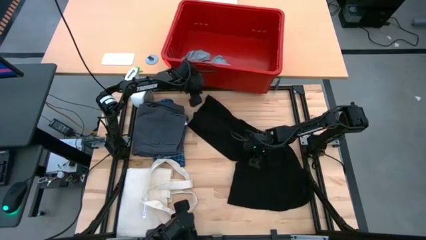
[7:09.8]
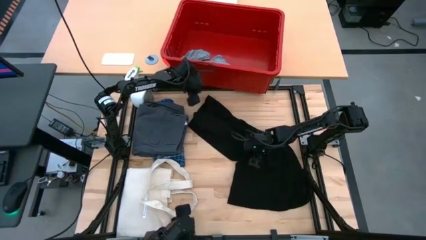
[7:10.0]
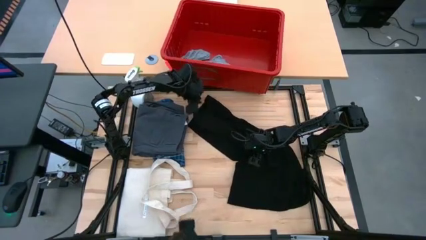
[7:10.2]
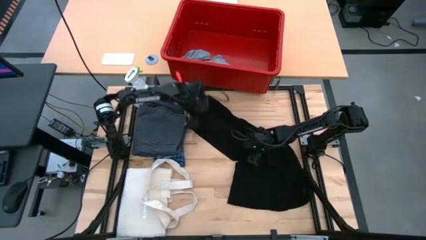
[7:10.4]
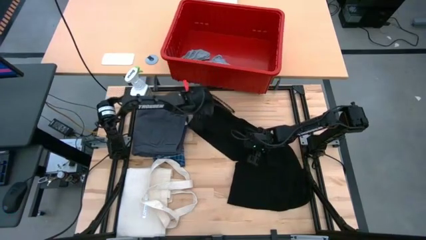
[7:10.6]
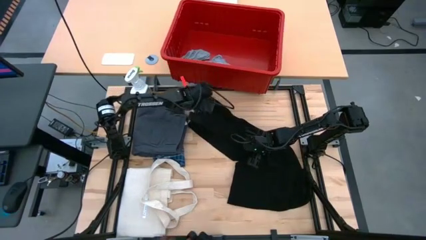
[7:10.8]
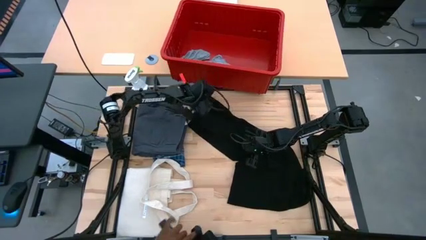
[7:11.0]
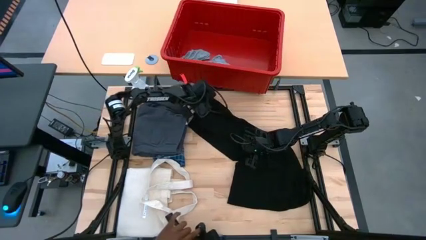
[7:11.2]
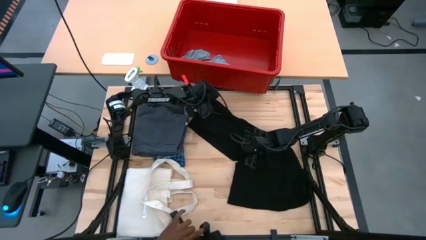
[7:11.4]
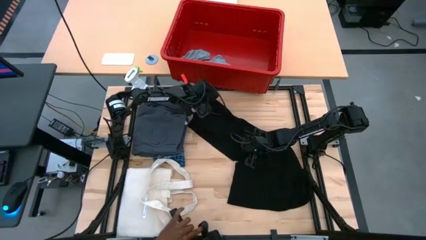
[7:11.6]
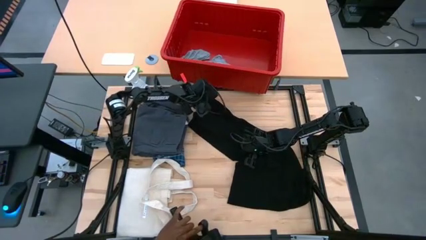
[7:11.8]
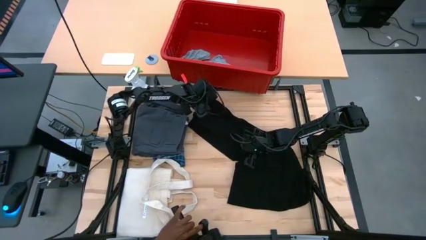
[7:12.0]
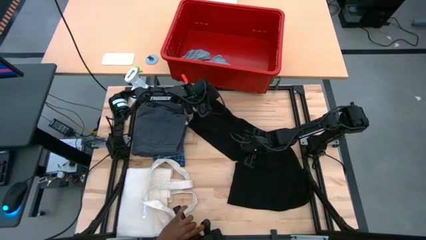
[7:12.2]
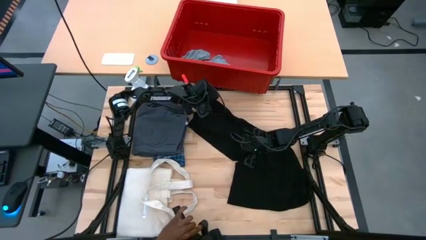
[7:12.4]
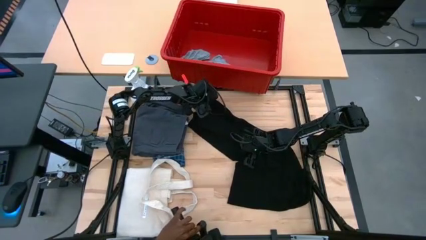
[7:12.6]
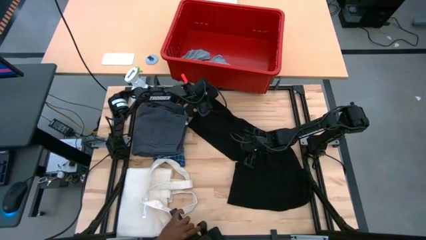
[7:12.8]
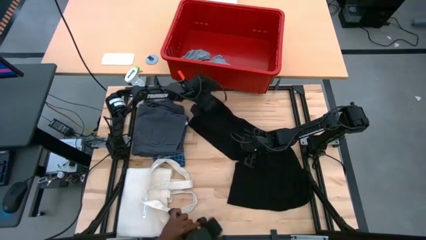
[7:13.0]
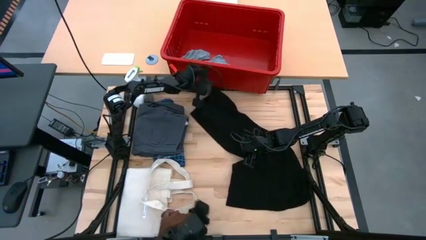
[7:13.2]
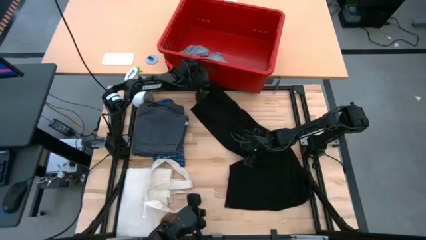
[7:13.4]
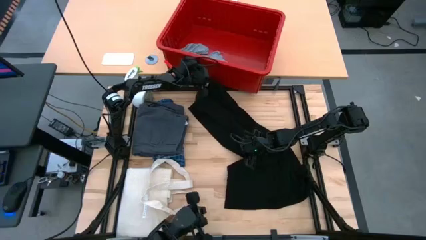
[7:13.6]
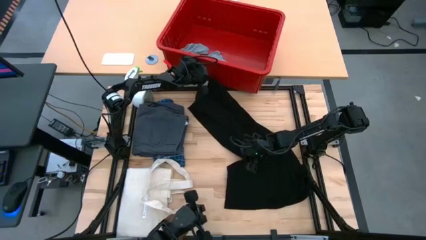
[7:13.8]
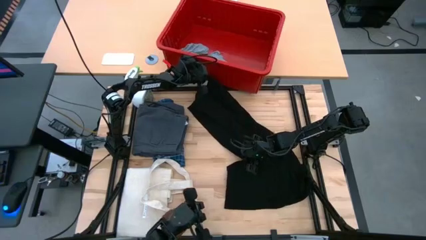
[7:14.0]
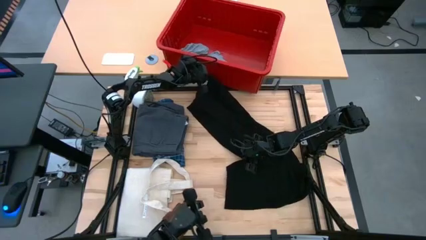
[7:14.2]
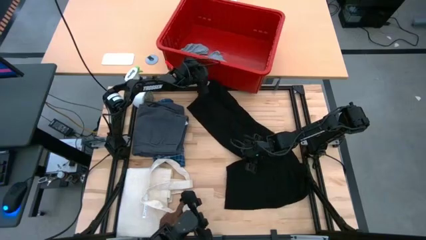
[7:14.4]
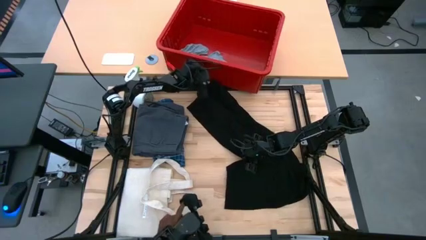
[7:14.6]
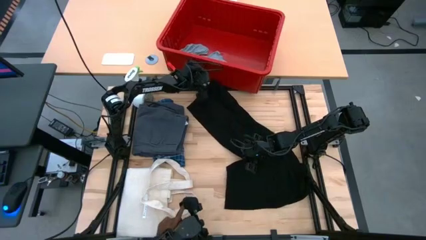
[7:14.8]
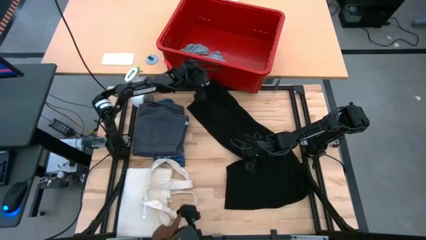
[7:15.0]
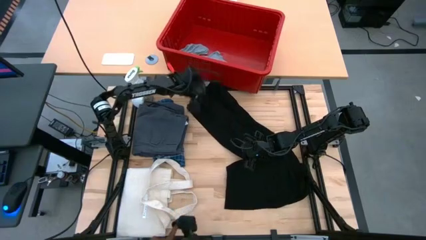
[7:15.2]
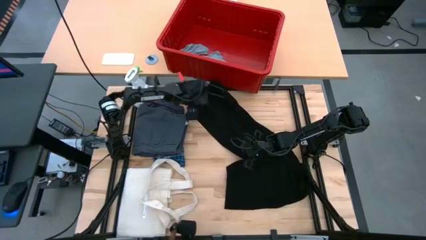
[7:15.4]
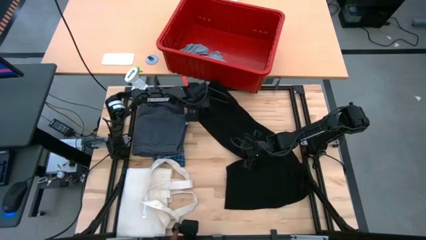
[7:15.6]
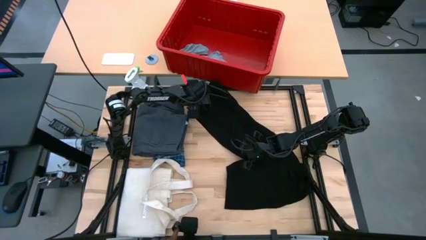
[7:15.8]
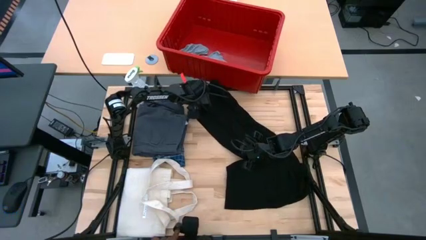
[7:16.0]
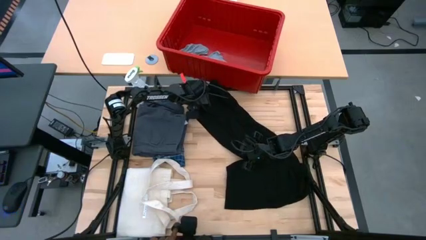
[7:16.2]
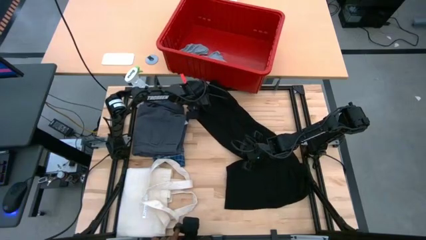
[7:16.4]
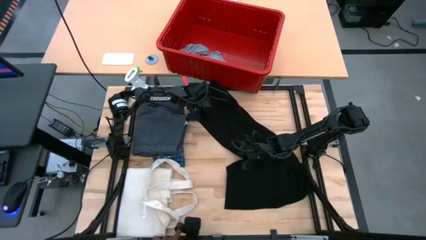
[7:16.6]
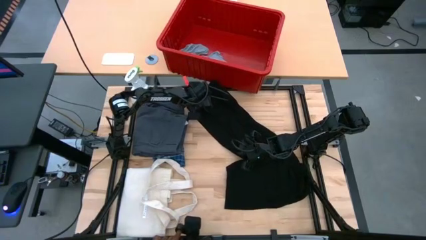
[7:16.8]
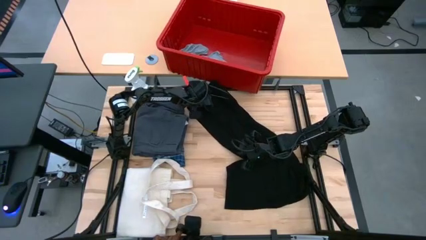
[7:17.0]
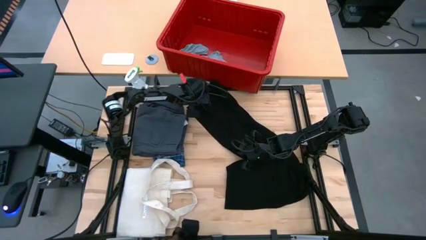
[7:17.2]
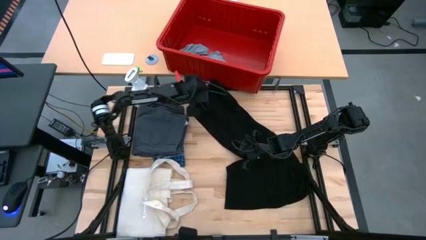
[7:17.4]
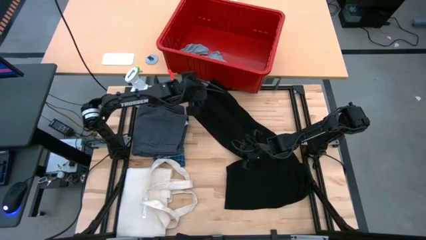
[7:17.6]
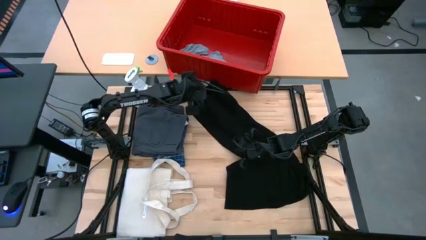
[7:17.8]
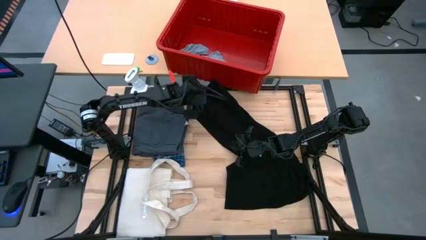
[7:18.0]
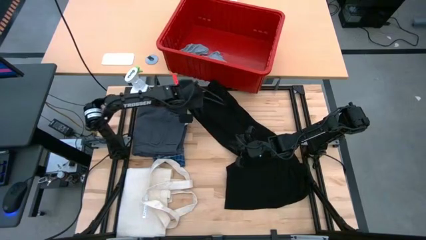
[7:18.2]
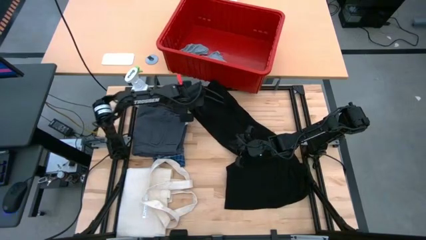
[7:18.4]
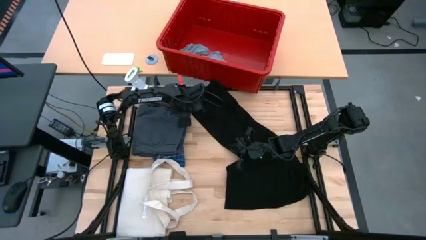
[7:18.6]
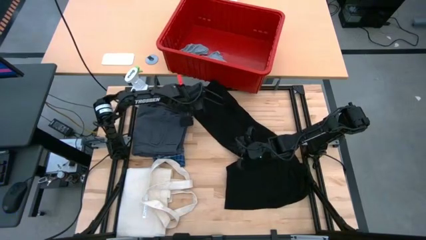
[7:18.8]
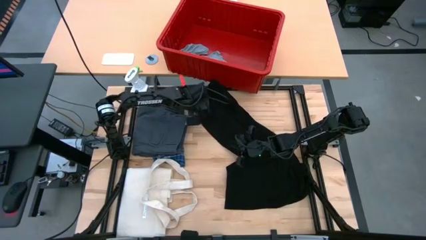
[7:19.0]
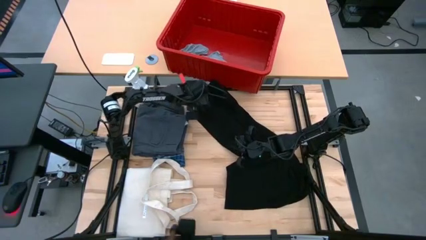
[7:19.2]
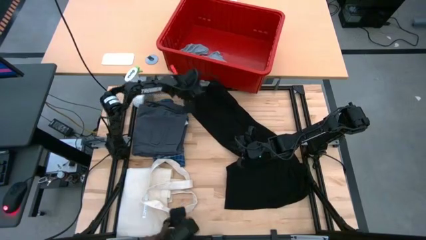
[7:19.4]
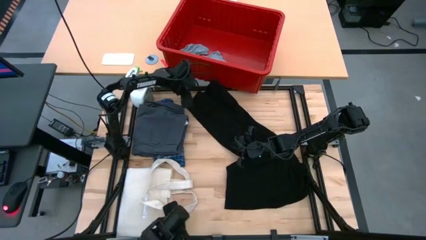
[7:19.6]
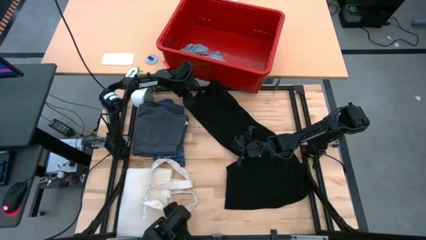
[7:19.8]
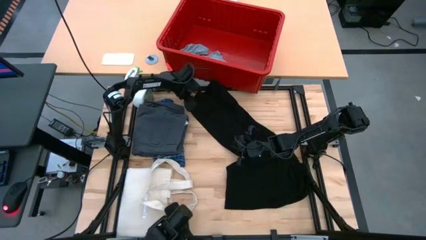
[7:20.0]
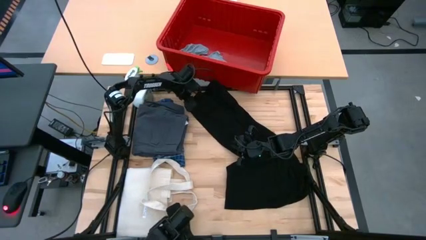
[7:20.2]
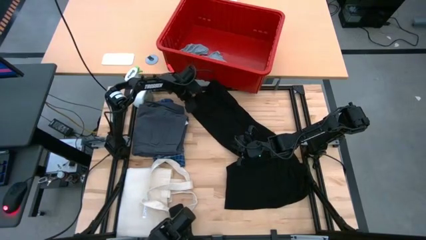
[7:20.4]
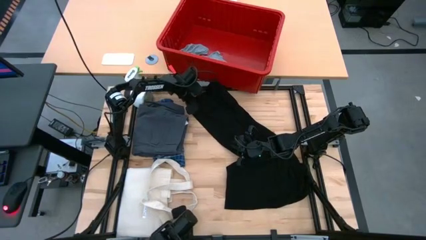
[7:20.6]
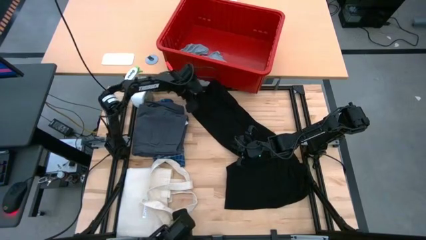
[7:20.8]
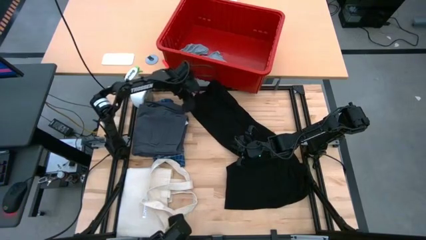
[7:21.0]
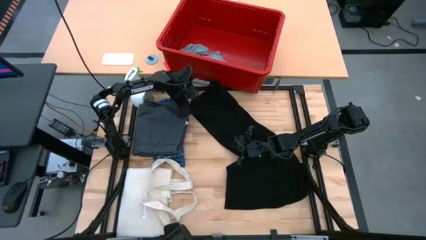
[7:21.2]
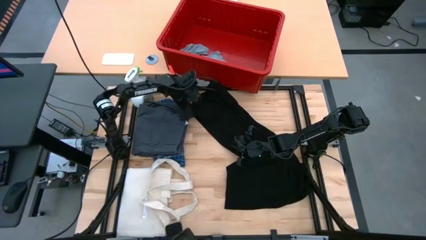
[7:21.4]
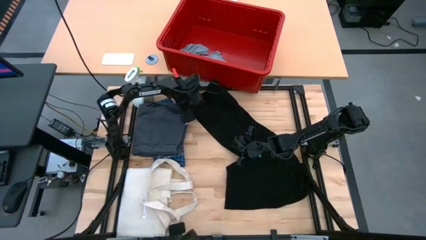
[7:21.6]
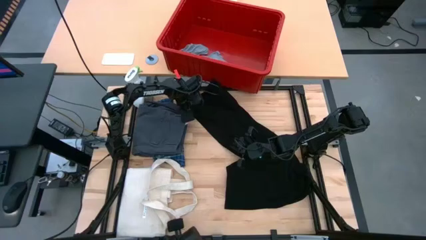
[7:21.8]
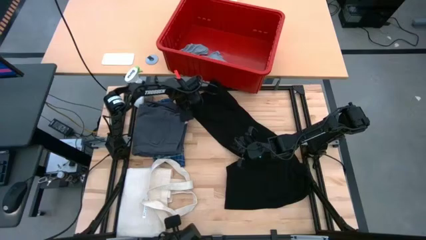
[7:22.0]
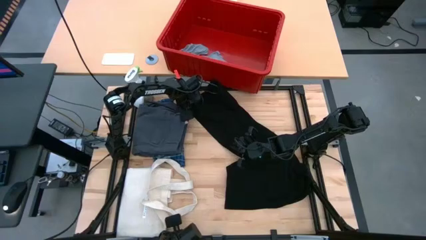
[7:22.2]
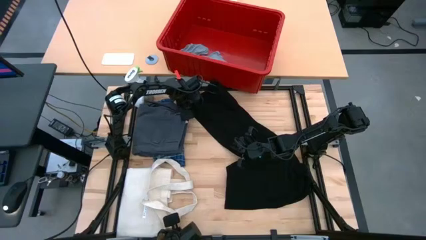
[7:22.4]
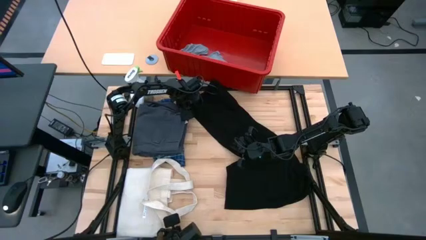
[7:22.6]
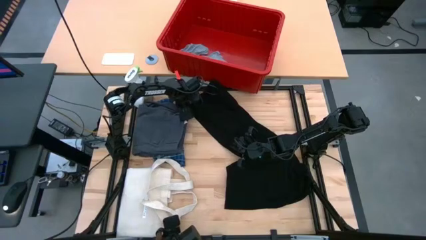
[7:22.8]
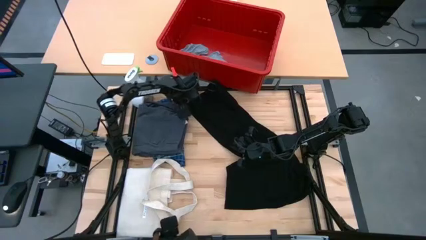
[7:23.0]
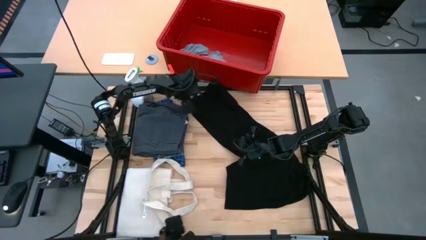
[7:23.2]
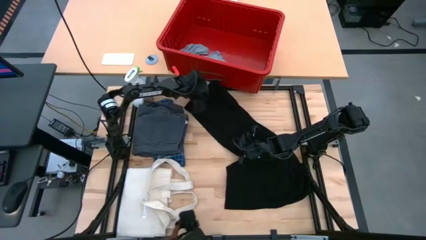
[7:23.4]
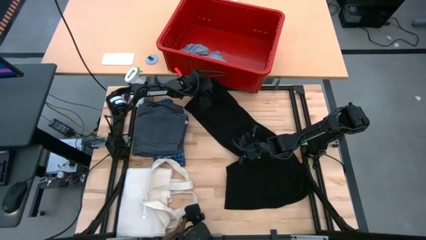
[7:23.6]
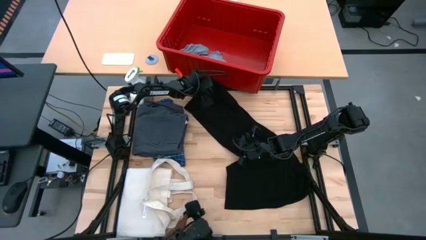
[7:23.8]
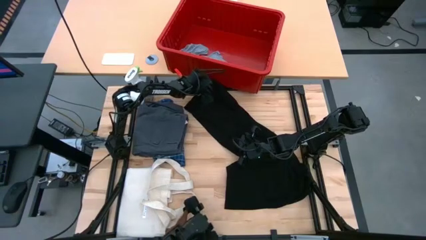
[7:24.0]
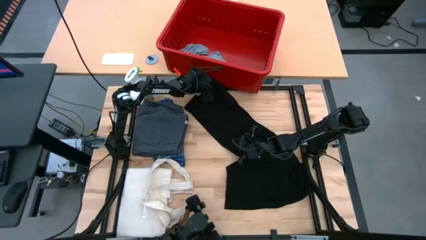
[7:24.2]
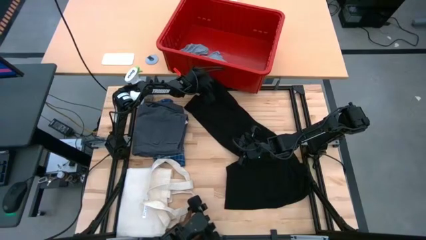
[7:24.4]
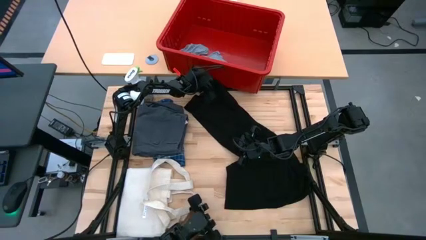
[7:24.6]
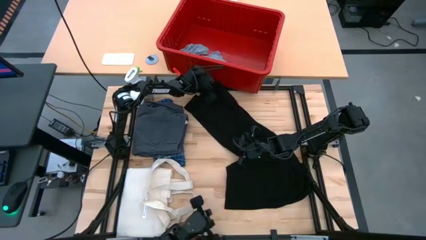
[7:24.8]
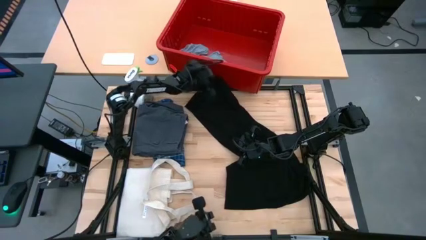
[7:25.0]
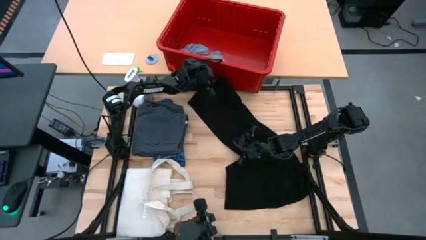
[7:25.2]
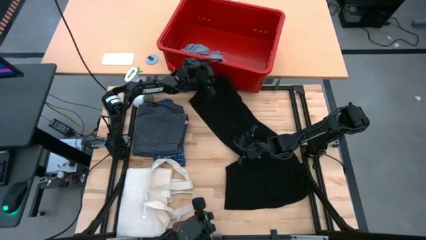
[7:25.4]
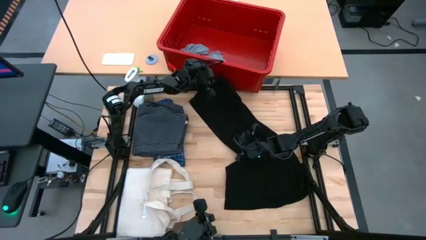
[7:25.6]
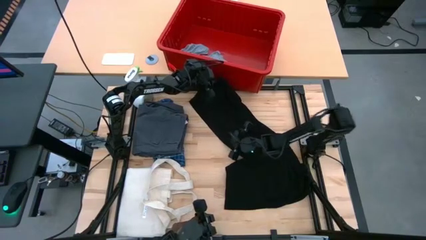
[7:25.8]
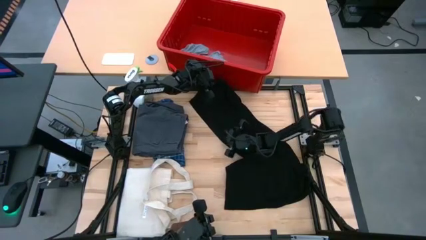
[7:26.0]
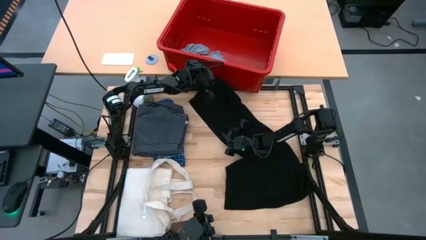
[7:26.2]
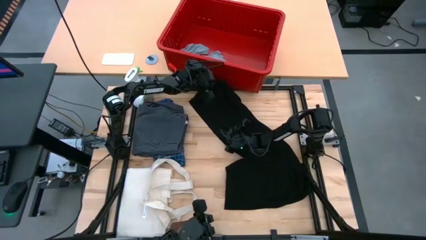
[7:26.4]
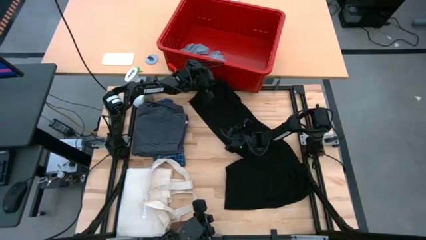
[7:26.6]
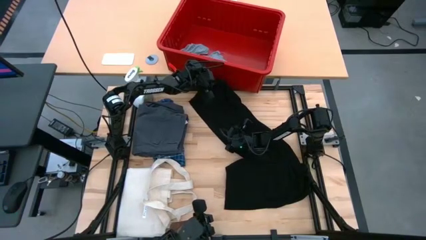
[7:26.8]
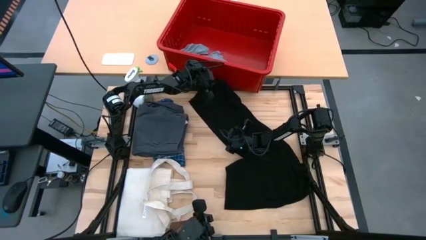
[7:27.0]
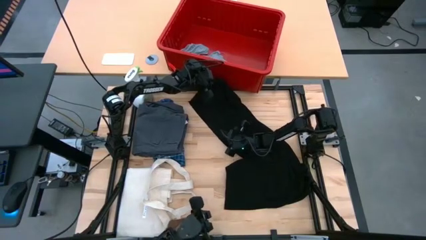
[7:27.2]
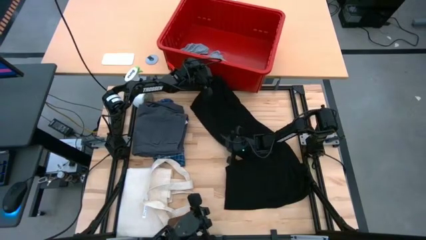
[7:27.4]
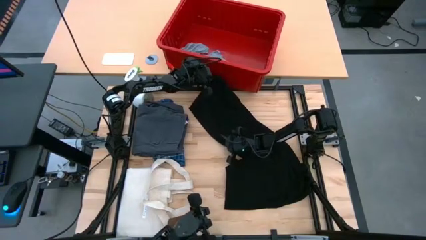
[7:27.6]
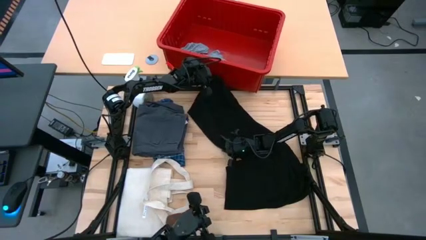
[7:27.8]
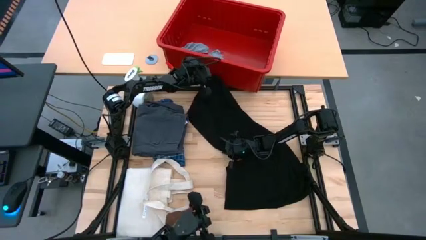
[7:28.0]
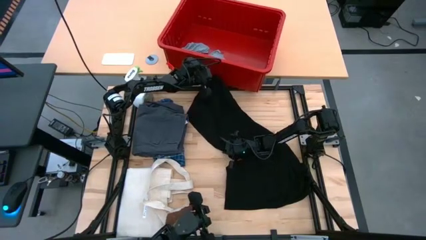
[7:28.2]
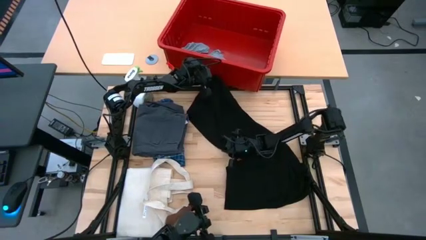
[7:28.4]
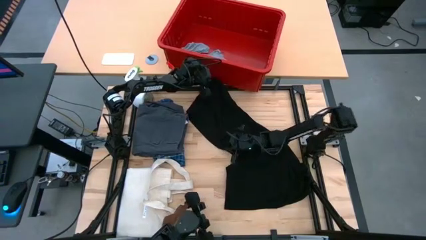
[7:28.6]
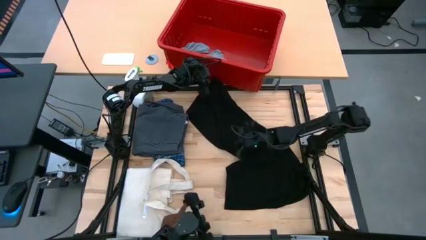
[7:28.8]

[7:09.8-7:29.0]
Task: Fold Laundry from Bin
Fold the black shirt
